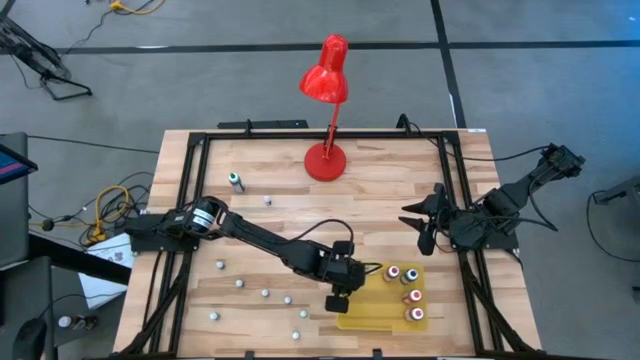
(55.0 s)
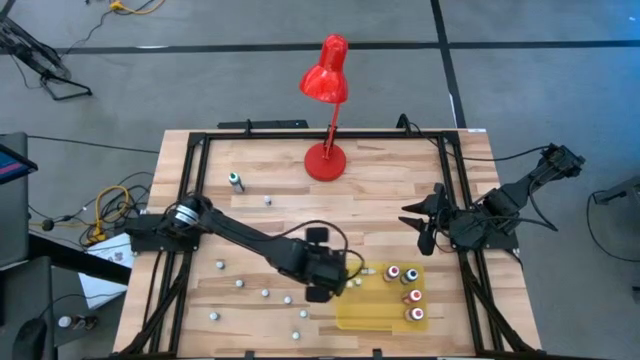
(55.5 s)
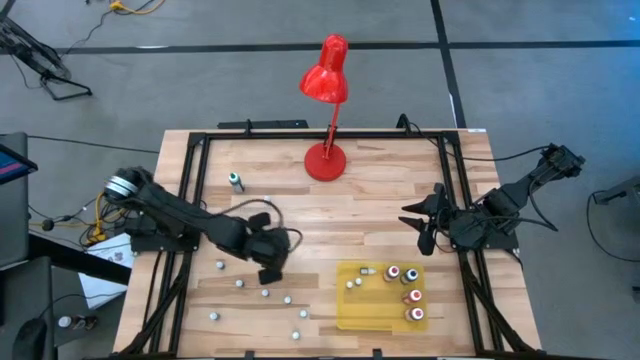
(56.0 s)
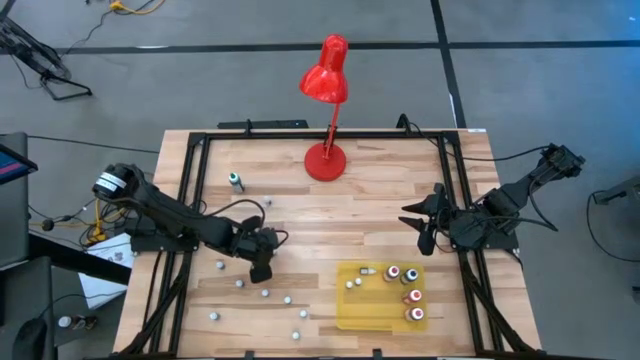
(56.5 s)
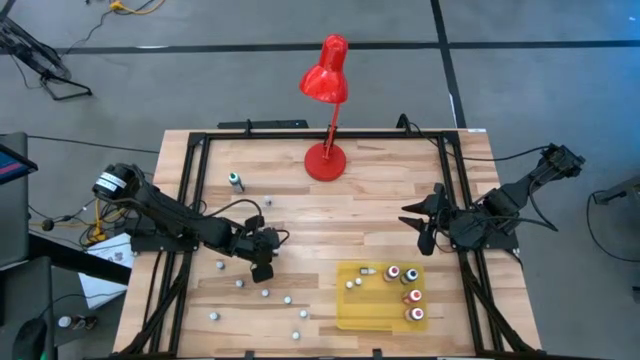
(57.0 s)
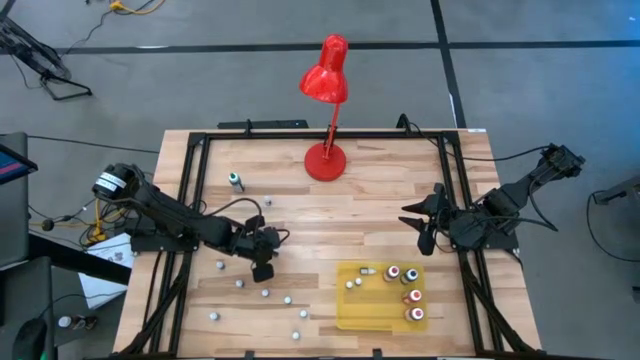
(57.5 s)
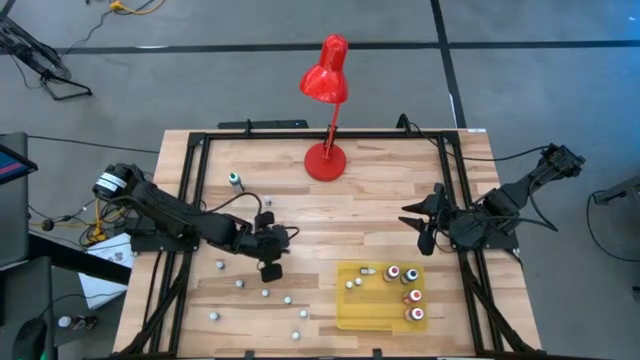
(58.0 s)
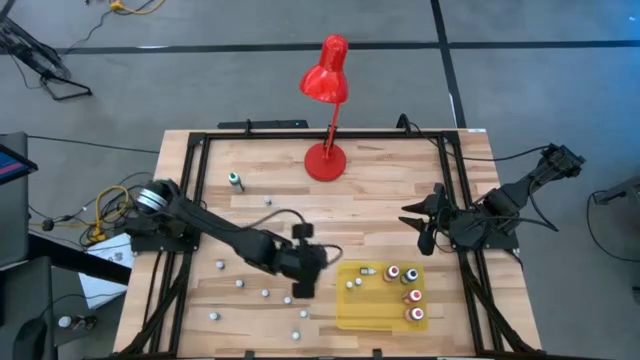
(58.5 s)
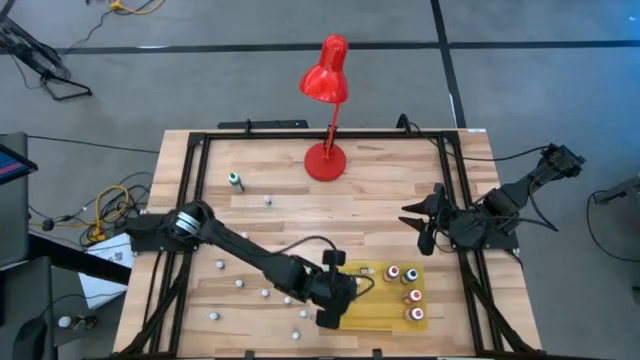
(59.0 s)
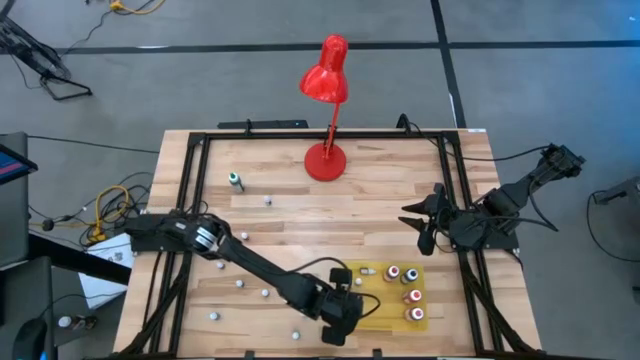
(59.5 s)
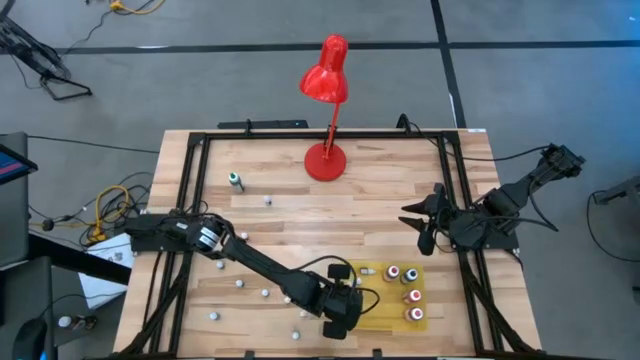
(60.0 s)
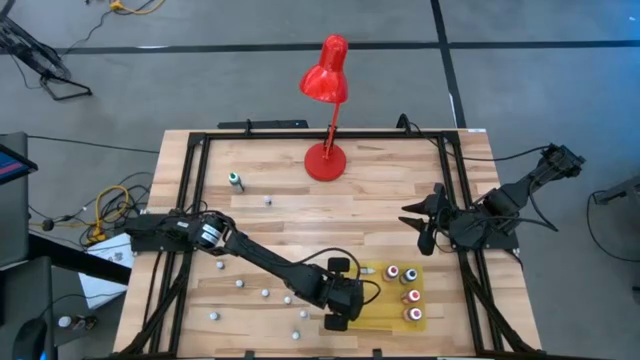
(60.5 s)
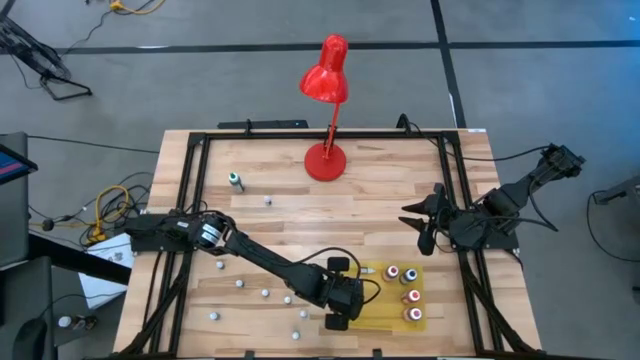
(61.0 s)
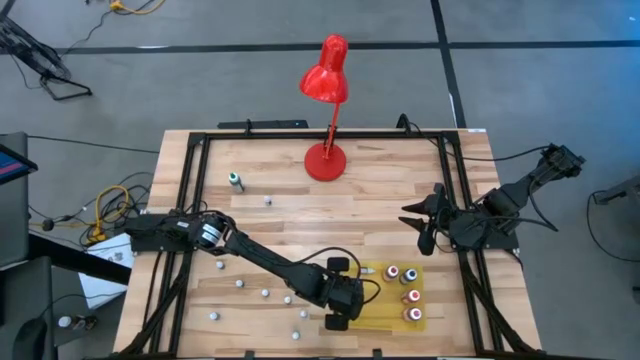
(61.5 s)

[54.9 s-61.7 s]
Task: Pick & Place food coloring
Put the green food coloring into the yellow bin

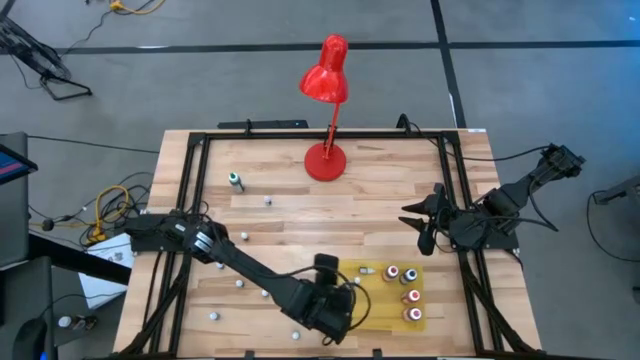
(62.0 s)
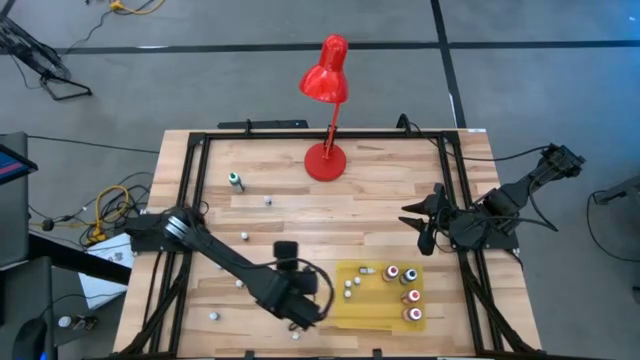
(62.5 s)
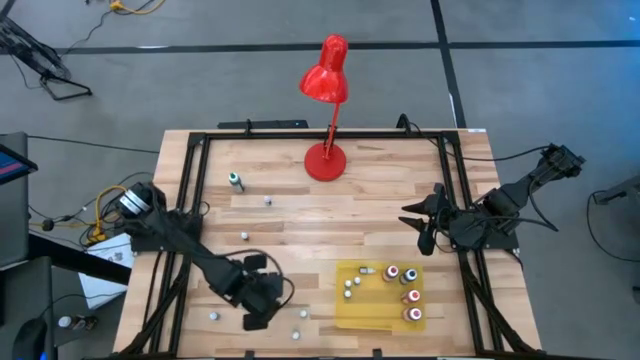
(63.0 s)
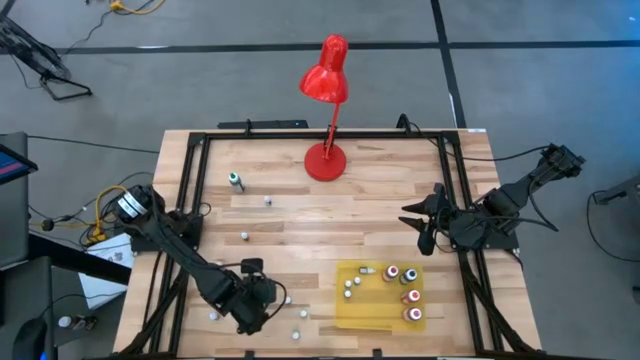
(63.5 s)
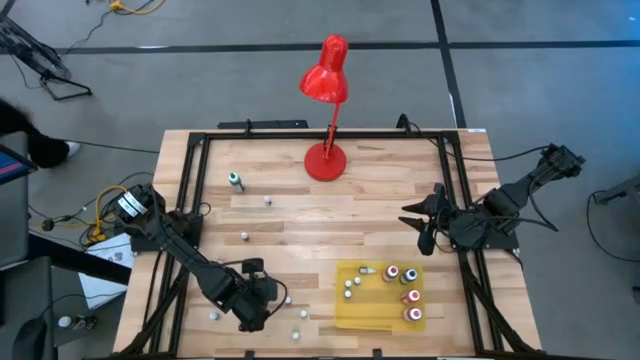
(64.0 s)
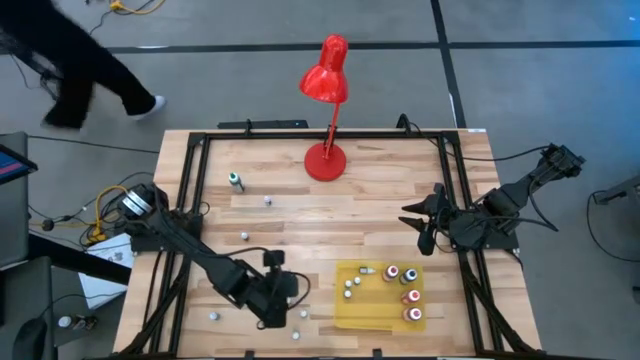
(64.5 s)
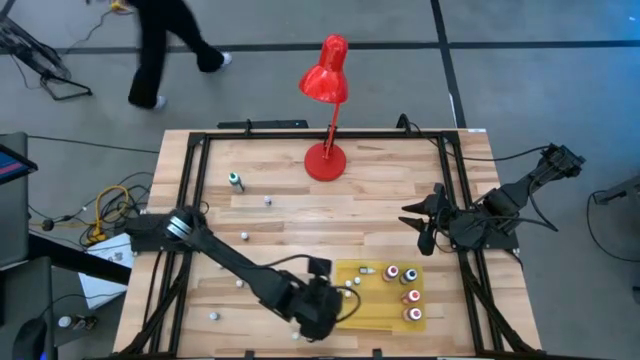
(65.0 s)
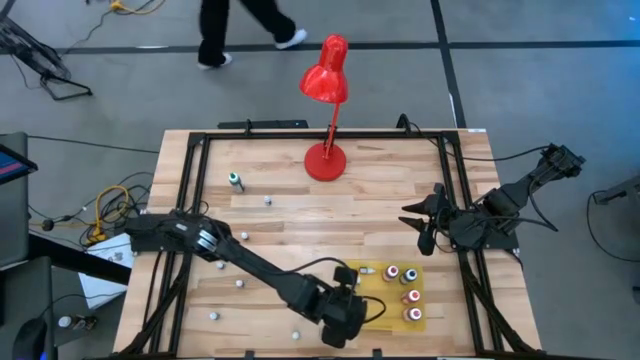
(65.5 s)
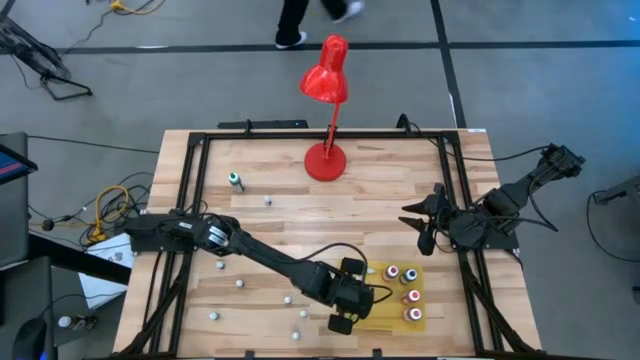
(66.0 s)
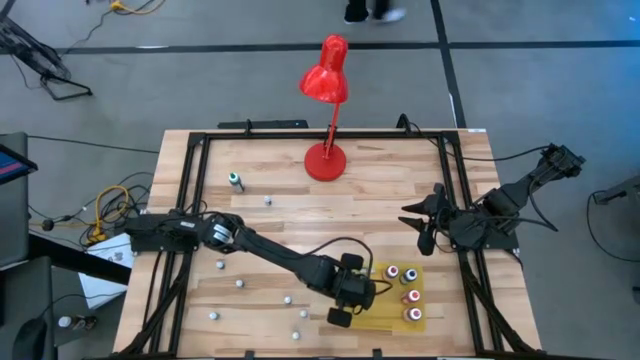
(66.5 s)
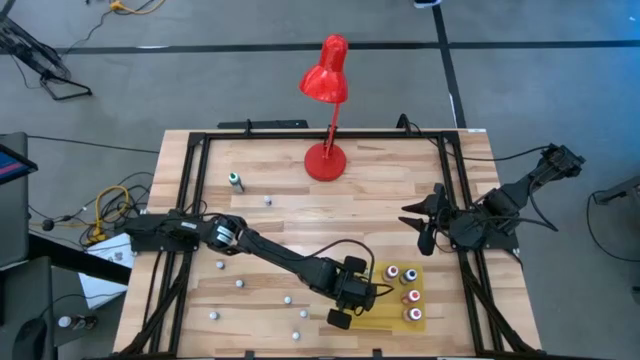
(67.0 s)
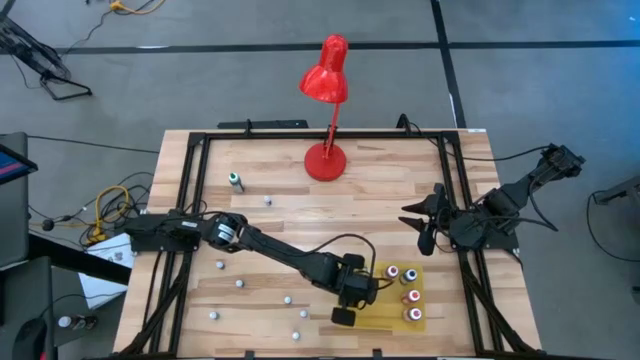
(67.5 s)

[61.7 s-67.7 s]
Put the red food coloring into the yellow bin

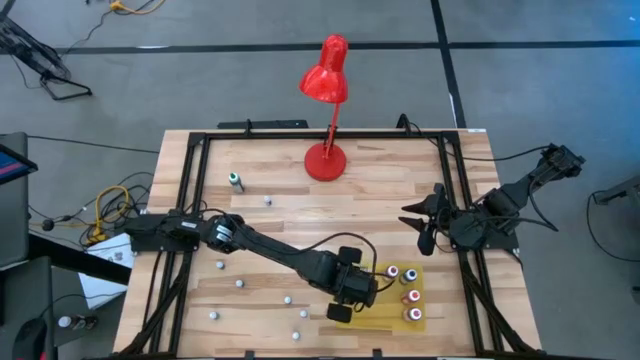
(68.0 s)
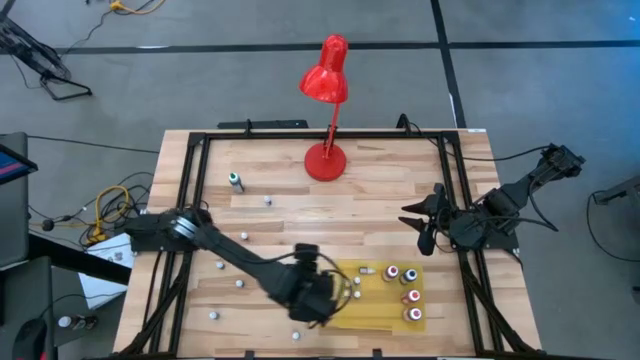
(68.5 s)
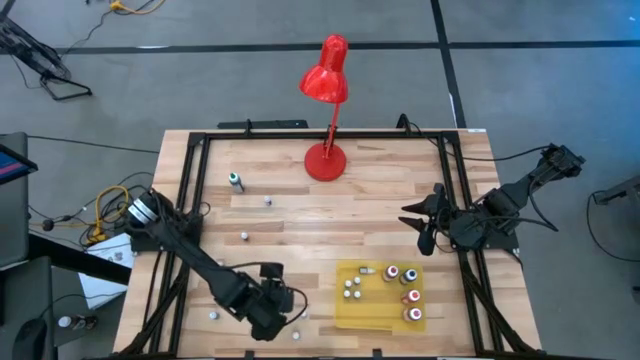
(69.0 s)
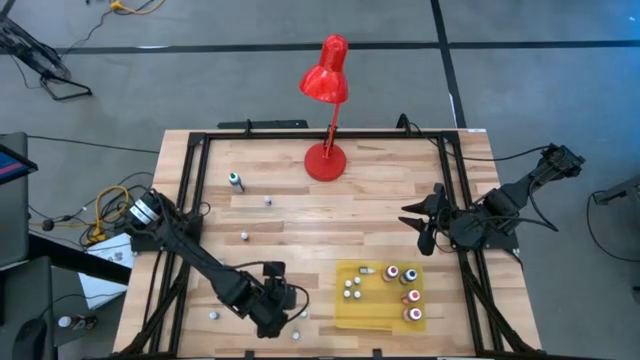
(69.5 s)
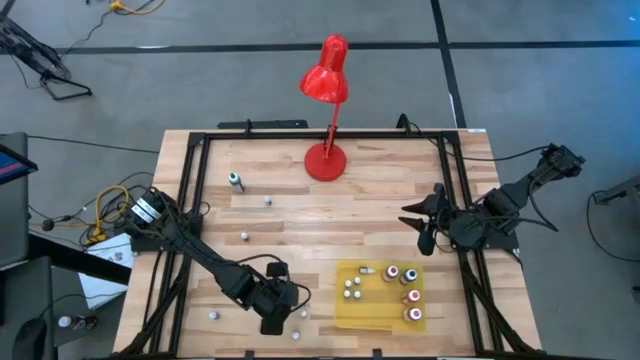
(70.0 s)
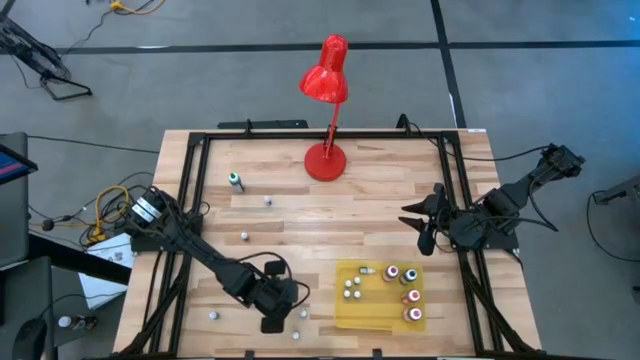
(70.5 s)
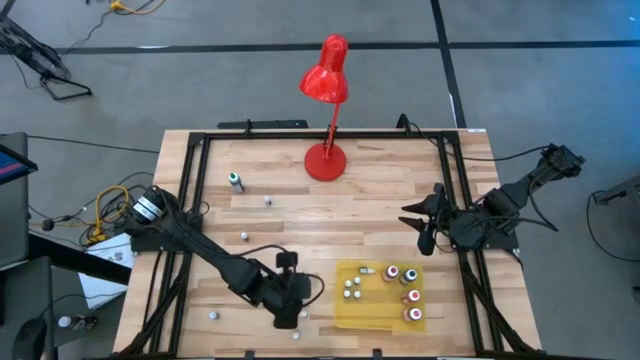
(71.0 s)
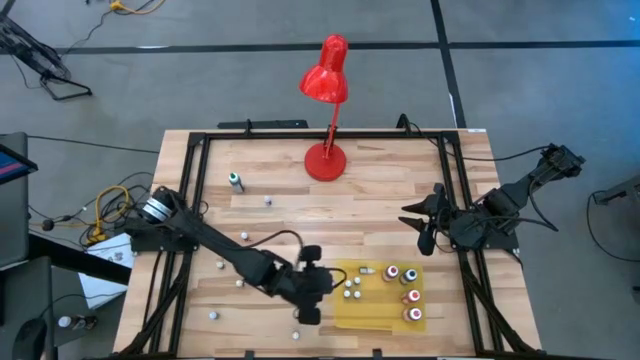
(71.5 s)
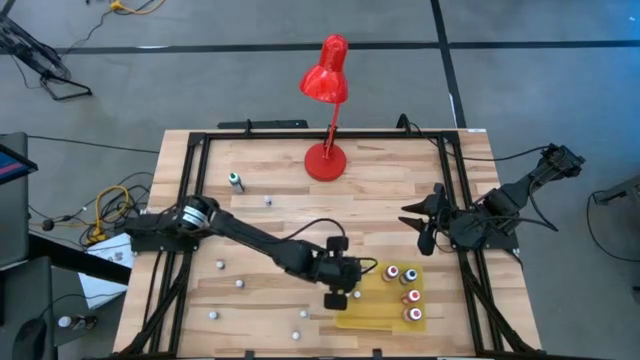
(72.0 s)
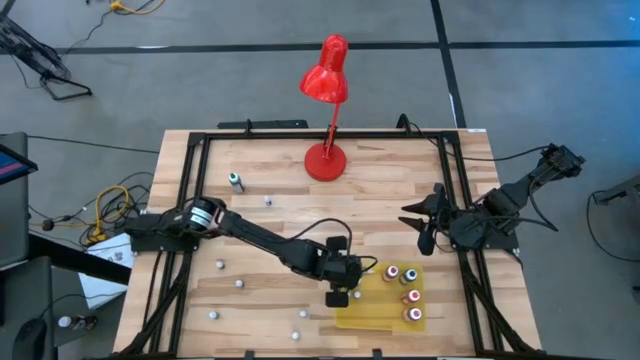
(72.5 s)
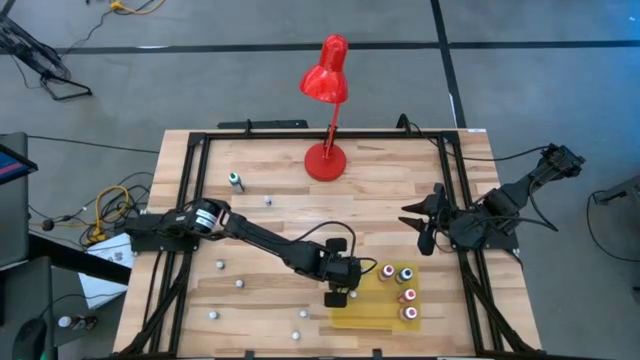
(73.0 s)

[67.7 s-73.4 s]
Put the brown food coloring into the yellow bin

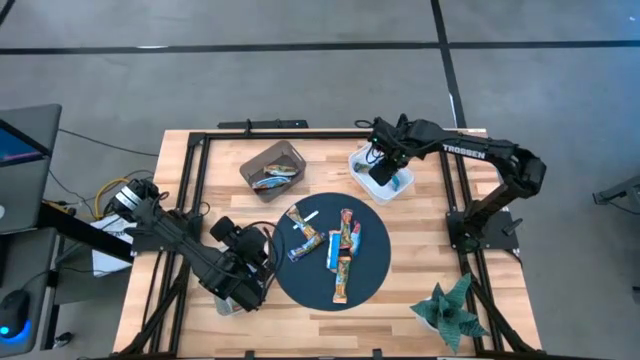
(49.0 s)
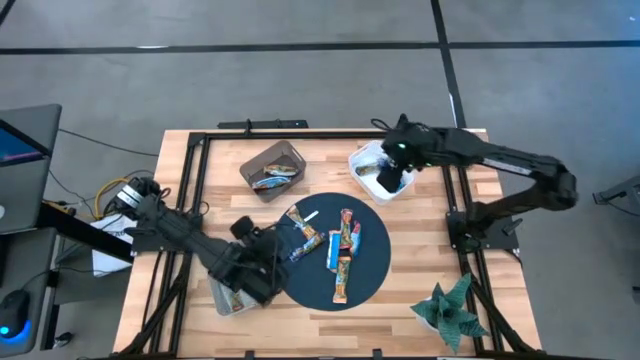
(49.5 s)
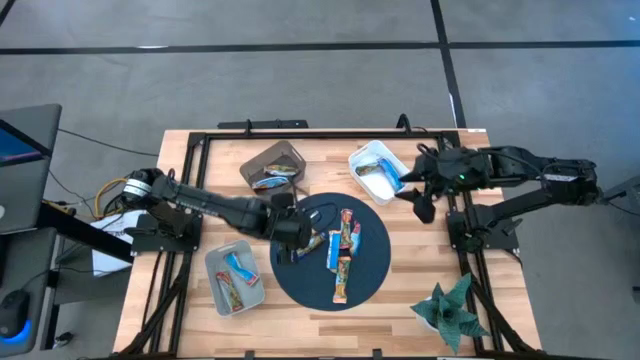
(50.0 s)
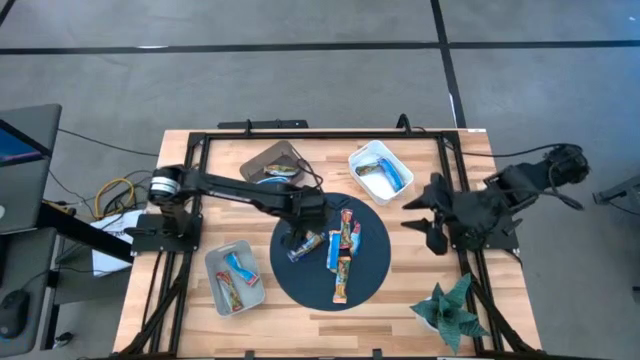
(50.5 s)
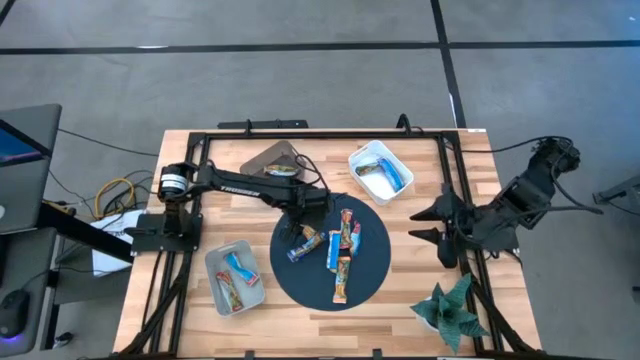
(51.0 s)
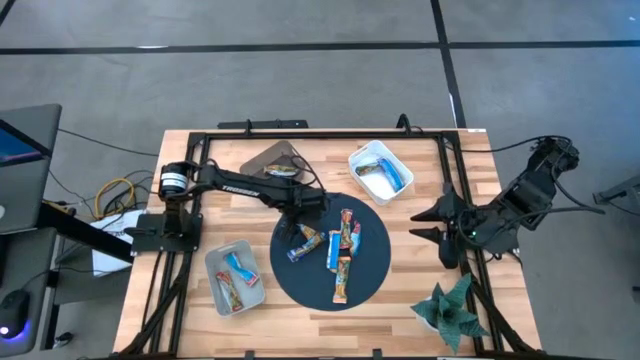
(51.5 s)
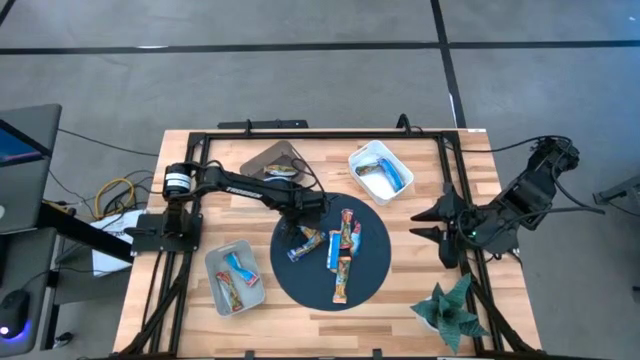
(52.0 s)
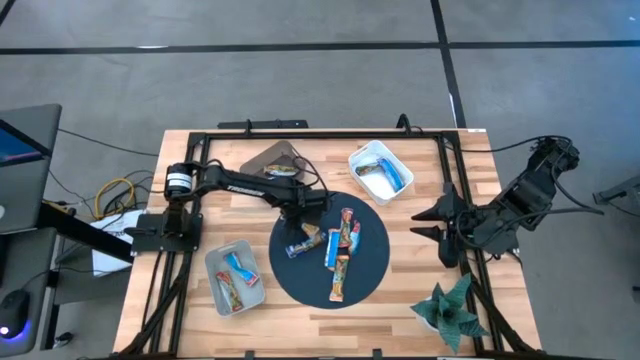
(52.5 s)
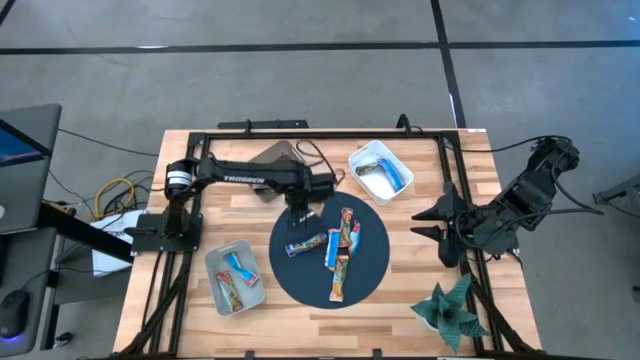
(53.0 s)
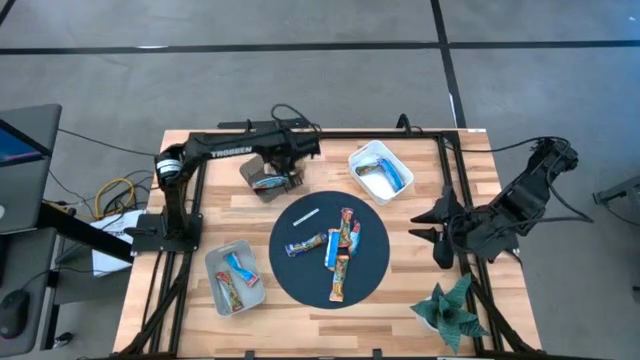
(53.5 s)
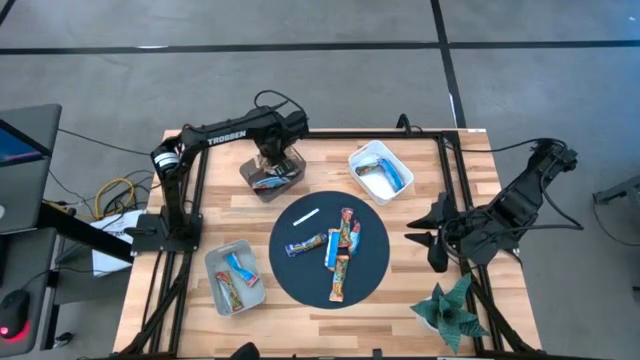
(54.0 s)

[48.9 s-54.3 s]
Task: Pick and place Granola Bars by type
Put the yellow granola bar into the black bin
